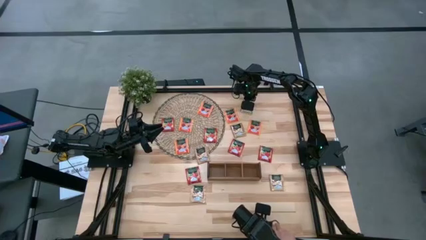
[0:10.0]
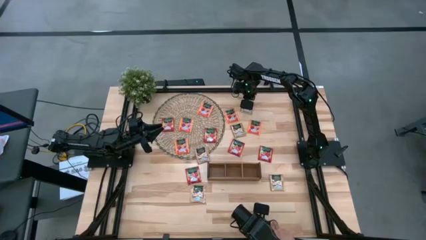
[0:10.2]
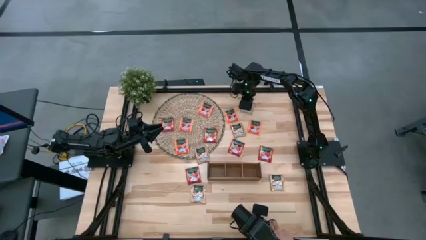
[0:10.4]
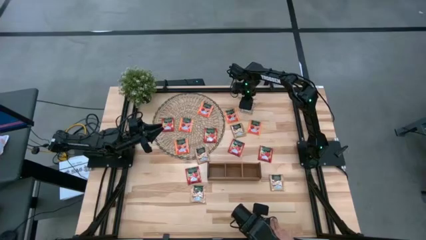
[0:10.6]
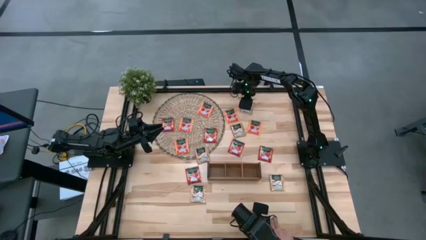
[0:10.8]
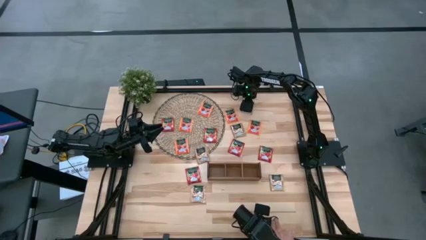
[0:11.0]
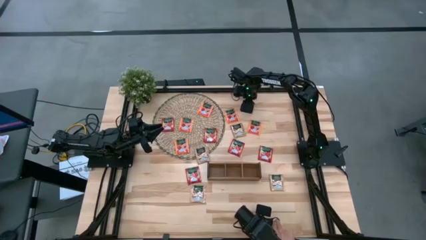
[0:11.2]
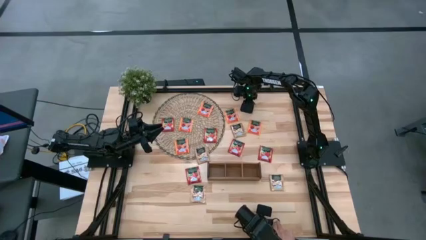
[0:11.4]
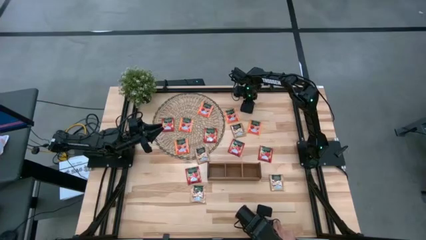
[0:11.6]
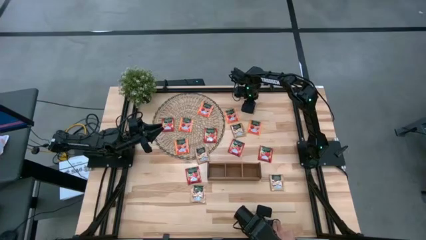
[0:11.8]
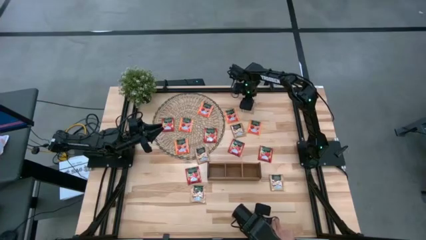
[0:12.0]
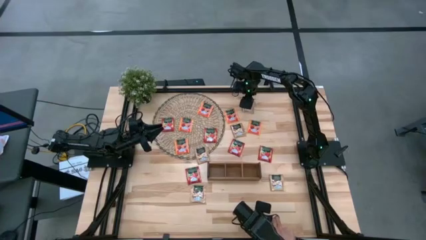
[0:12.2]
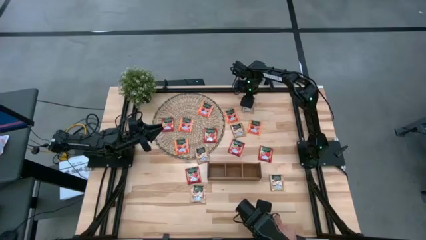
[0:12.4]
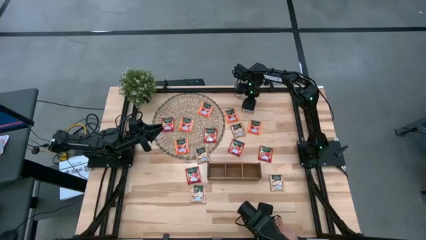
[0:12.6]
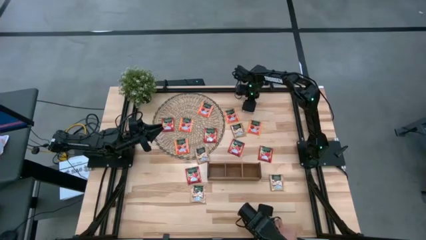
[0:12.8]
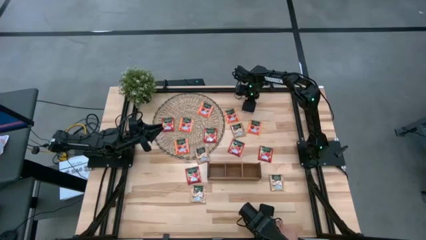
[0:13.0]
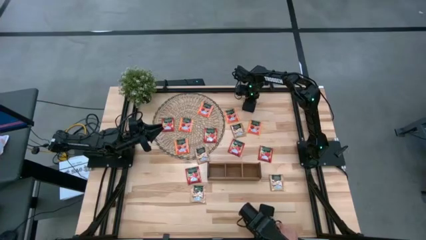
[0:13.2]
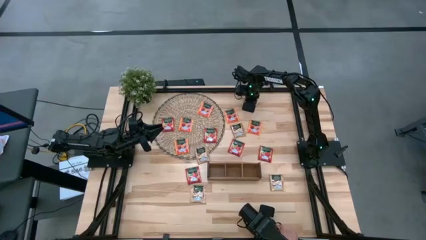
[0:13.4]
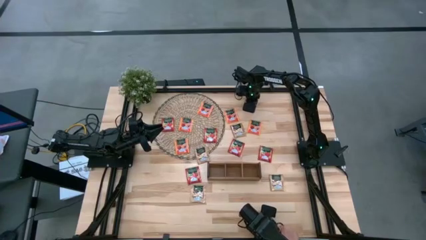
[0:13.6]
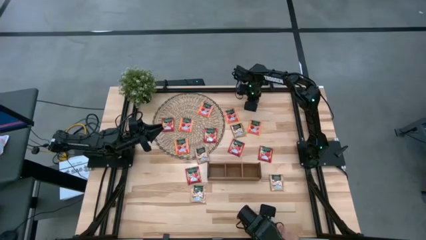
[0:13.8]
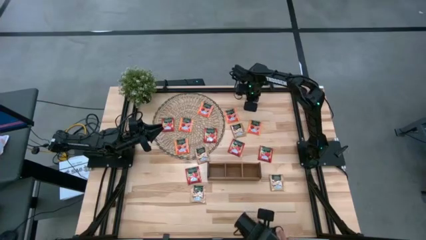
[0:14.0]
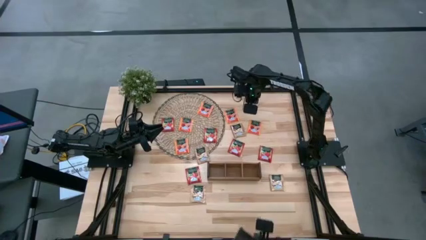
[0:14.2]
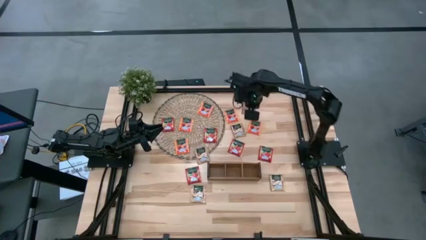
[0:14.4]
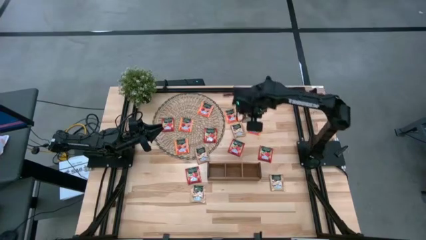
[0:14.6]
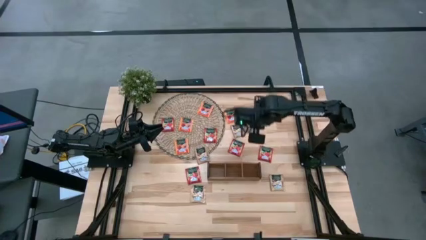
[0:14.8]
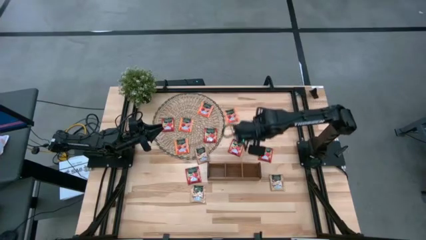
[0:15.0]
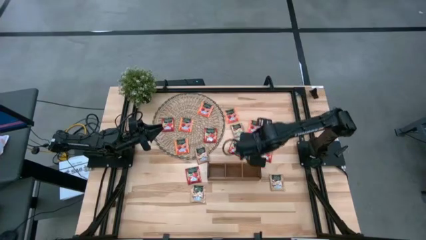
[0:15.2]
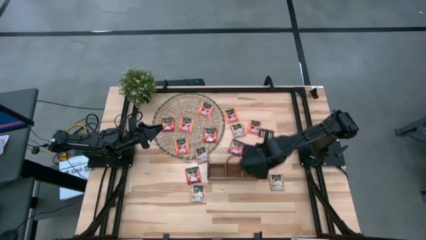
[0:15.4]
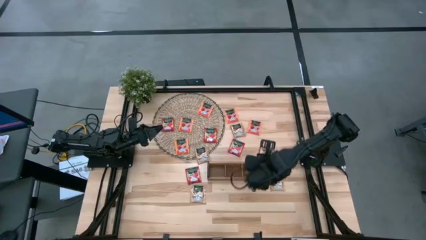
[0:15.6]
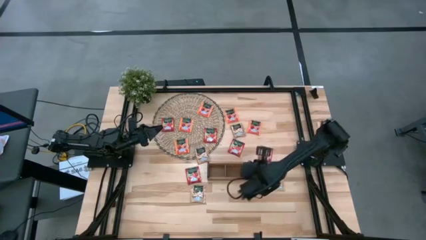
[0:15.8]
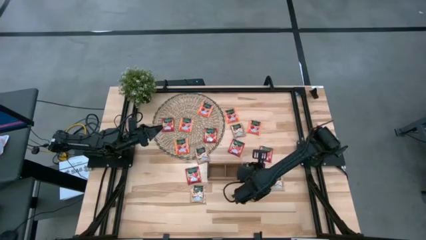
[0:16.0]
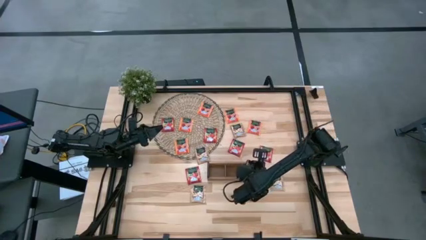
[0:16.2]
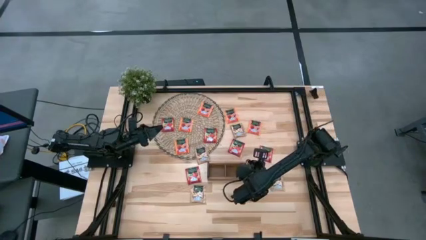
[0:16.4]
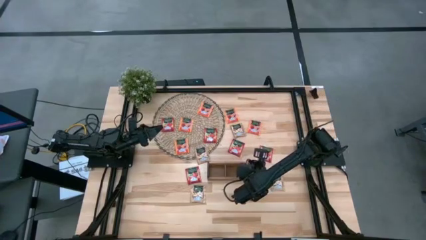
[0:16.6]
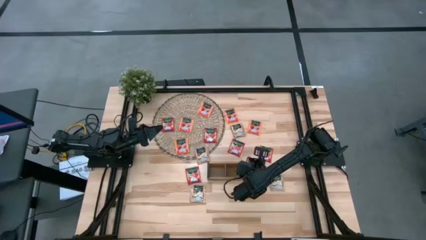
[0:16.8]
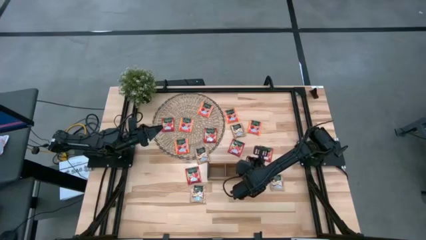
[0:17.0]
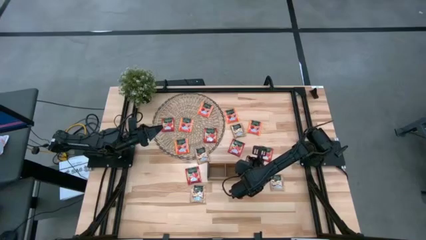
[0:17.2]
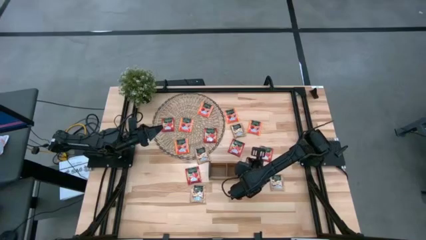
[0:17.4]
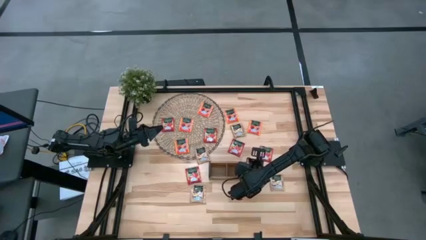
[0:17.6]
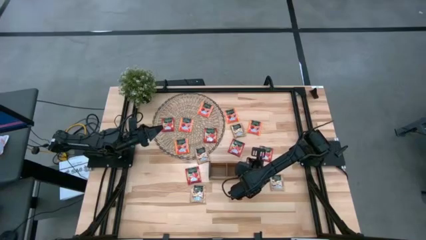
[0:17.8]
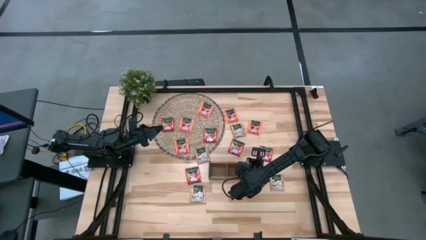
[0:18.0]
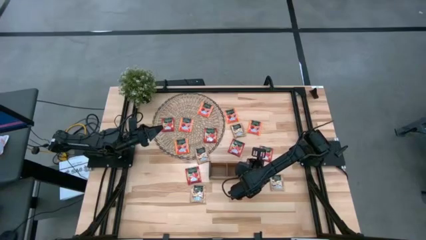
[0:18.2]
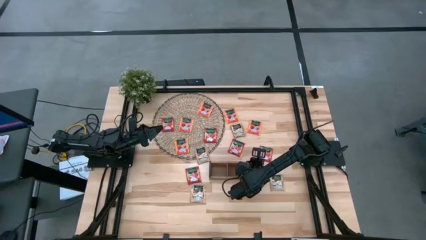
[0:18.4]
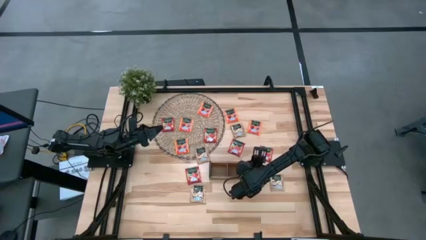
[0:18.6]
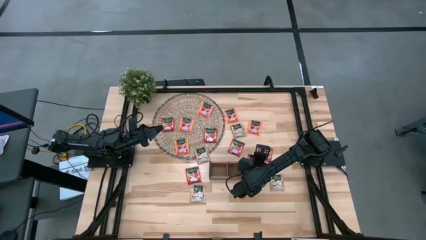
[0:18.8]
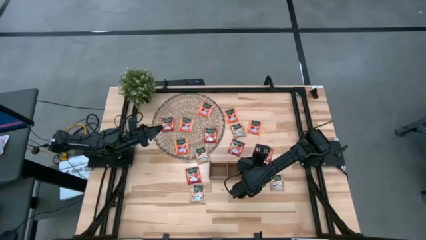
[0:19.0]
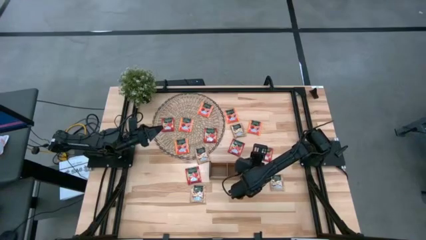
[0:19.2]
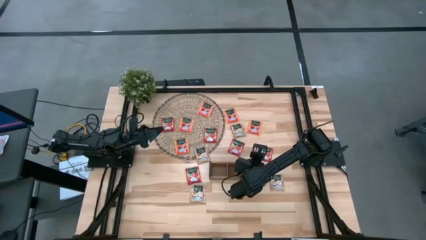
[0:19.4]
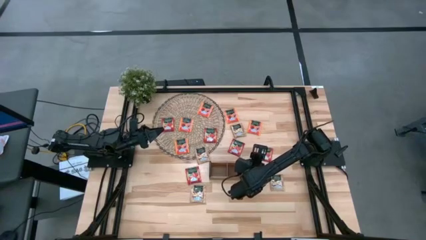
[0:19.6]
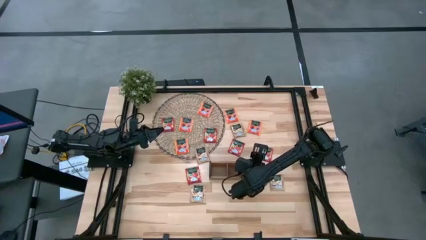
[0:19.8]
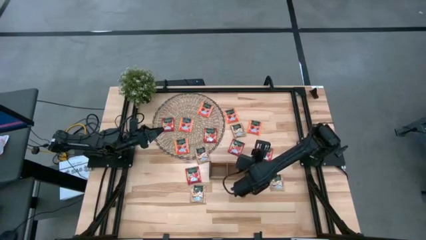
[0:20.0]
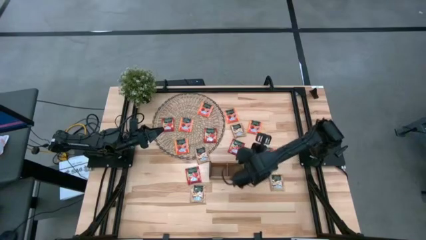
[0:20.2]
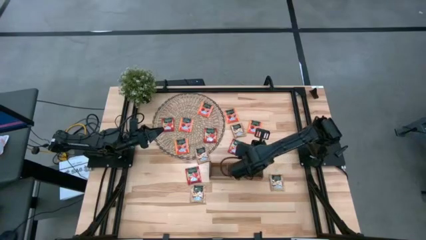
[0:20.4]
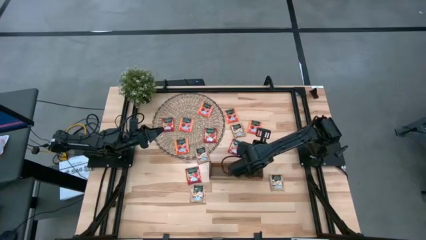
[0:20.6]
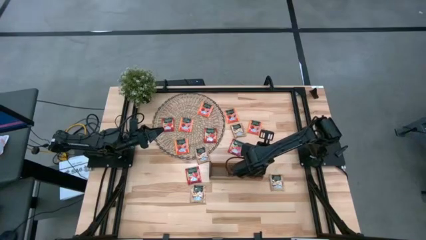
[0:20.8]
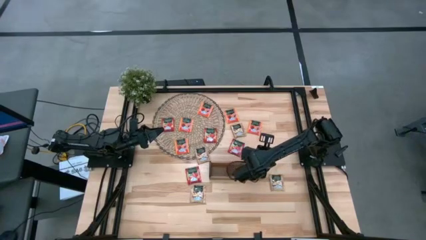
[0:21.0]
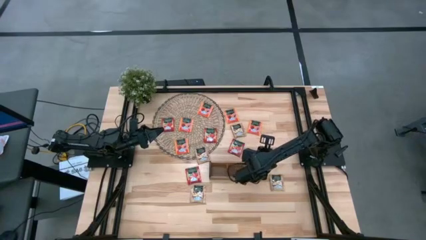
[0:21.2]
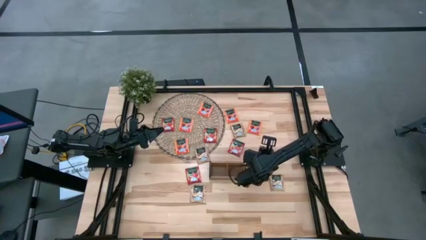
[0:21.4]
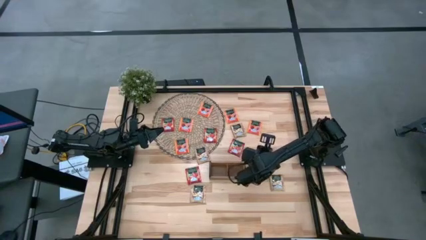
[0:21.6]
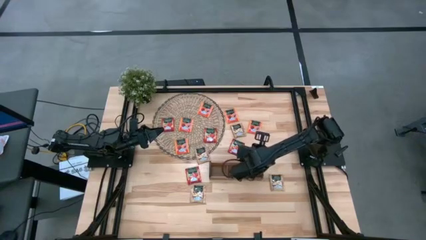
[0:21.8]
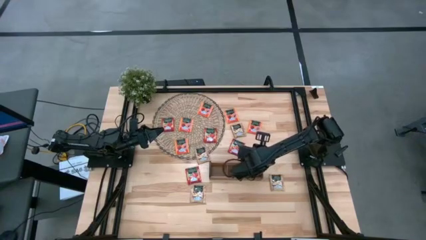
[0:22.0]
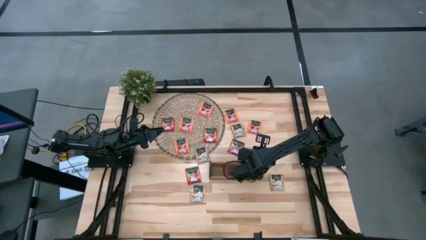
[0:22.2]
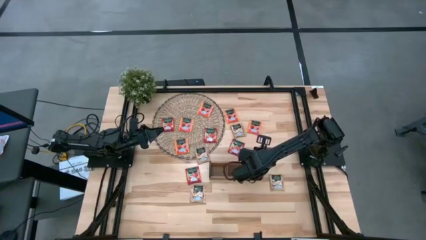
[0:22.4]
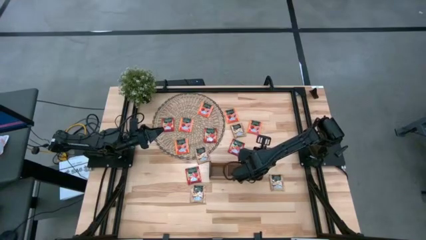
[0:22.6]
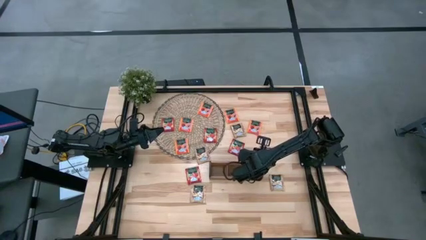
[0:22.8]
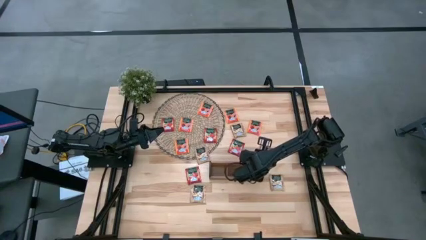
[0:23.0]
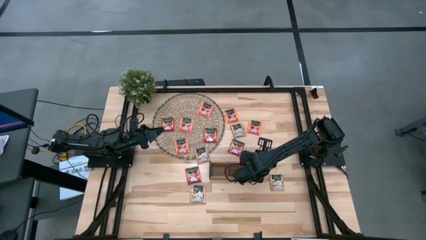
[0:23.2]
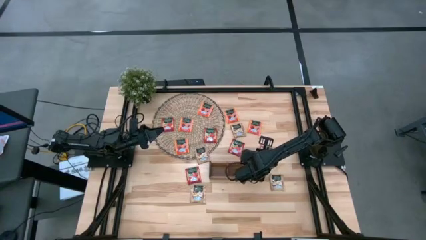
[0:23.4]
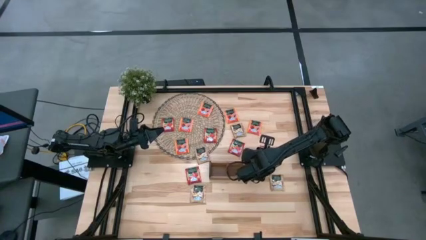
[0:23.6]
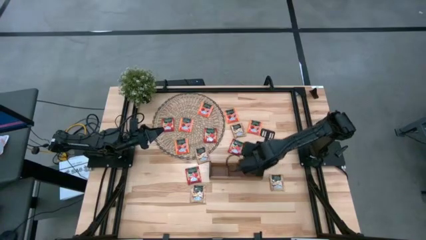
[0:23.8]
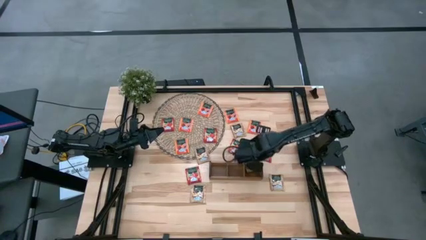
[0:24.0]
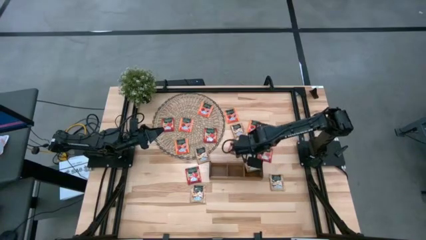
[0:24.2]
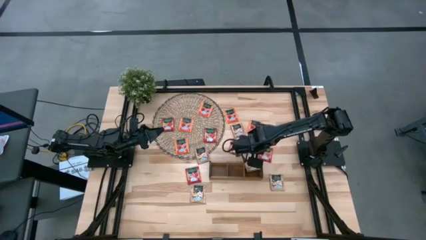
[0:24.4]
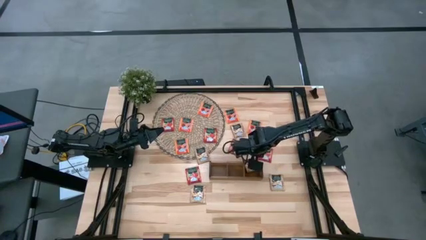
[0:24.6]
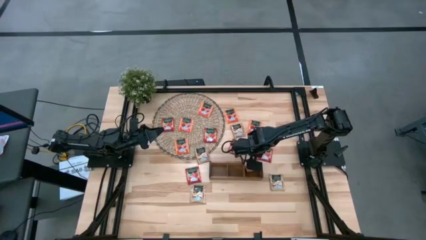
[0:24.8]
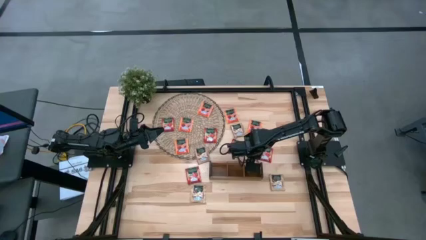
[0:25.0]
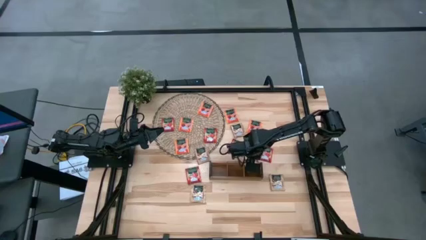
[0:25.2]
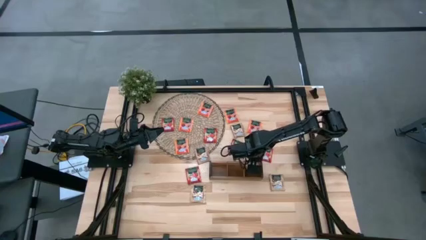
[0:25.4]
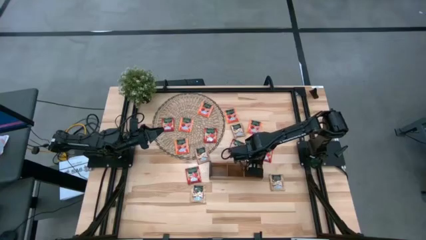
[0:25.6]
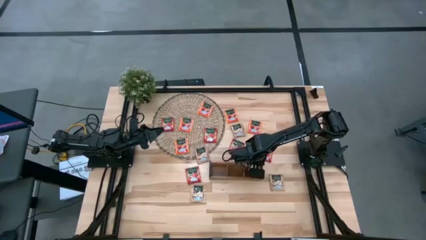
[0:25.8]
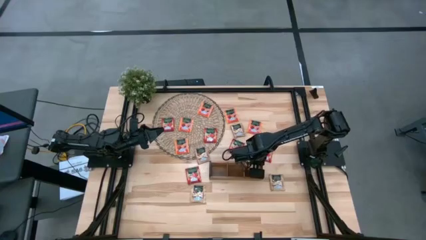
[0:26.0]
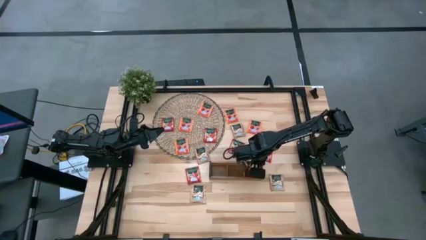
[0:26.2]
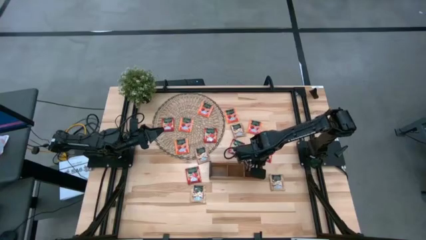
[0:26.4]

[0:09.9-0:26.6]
Task: Pick & Place Tea
Put the brown tea bag into the right slot of the wooden organizer
